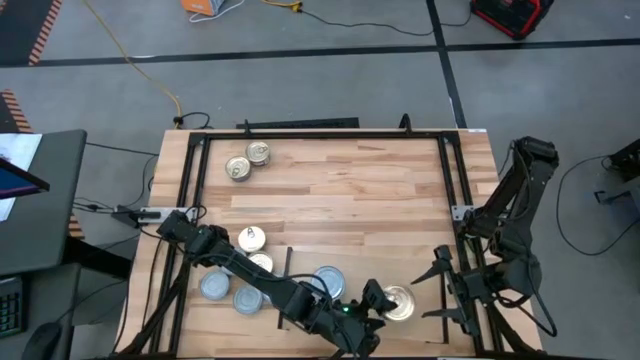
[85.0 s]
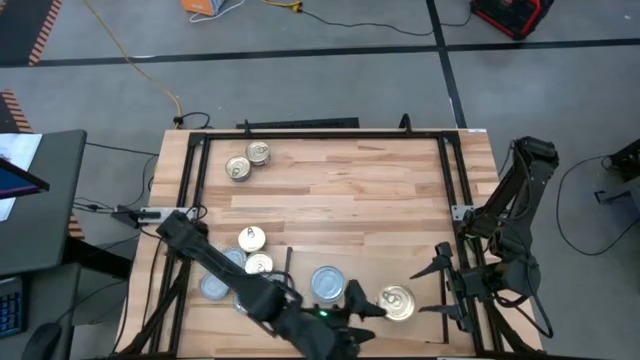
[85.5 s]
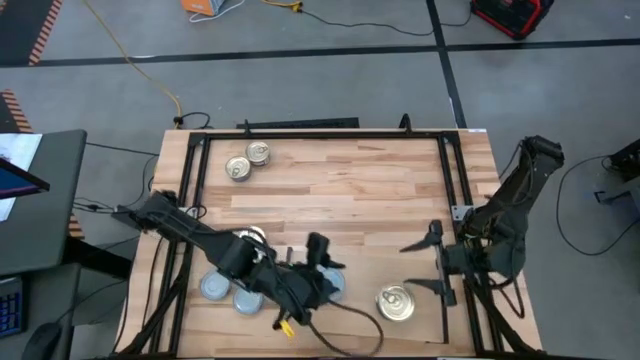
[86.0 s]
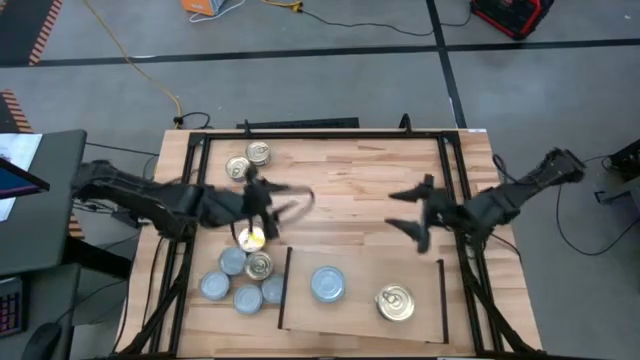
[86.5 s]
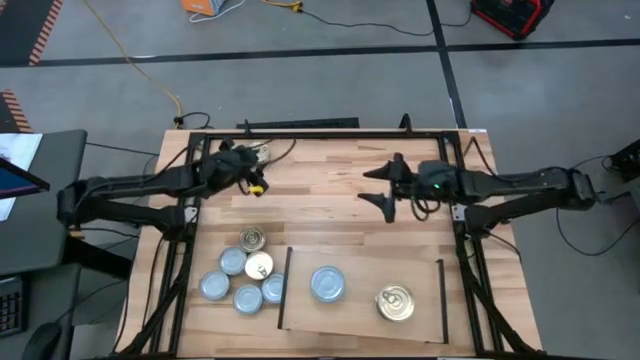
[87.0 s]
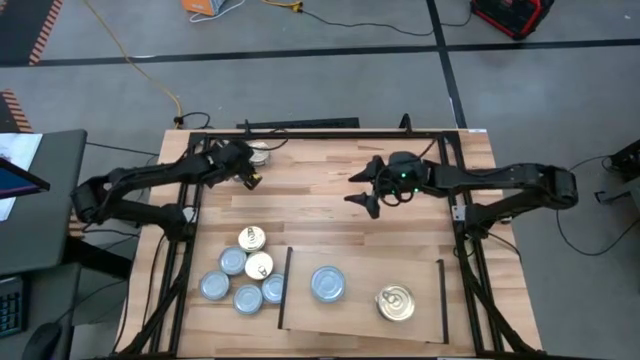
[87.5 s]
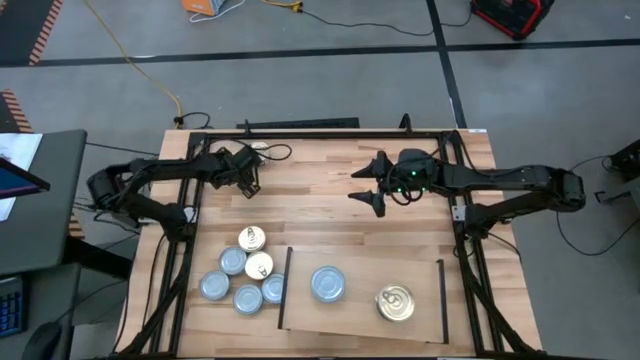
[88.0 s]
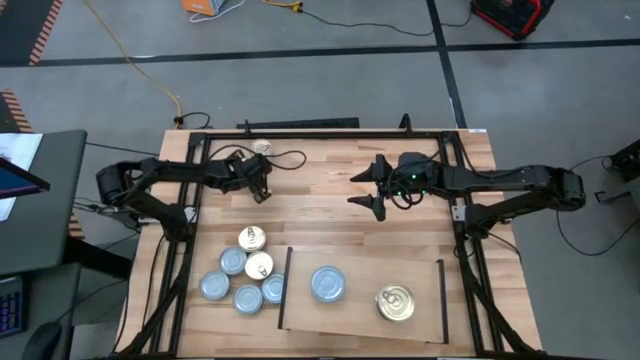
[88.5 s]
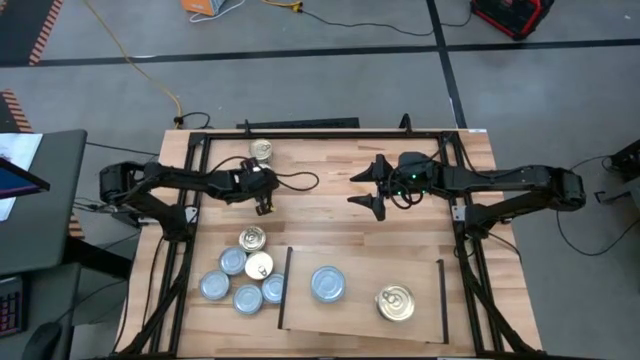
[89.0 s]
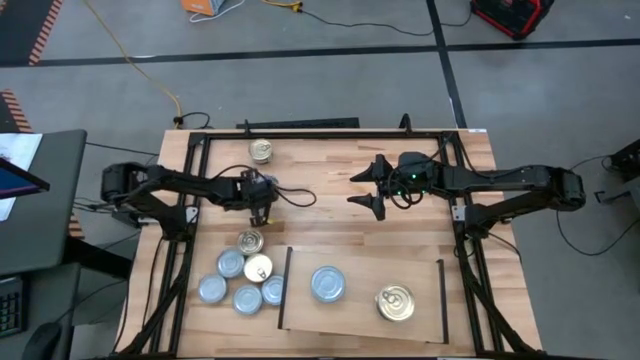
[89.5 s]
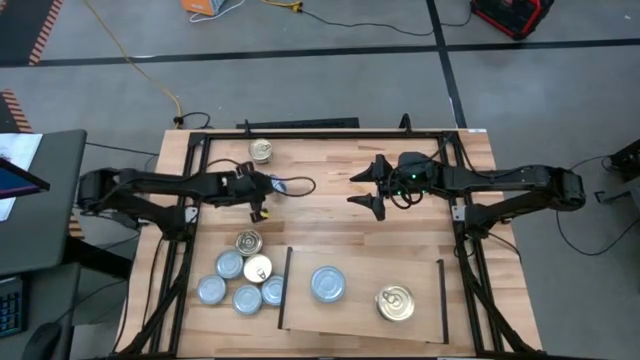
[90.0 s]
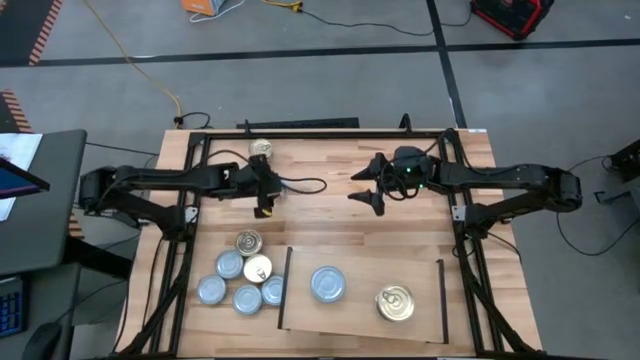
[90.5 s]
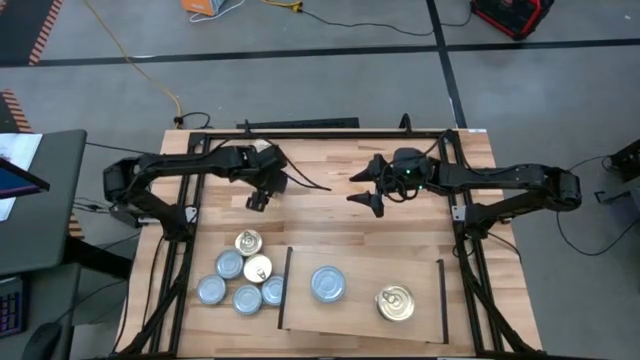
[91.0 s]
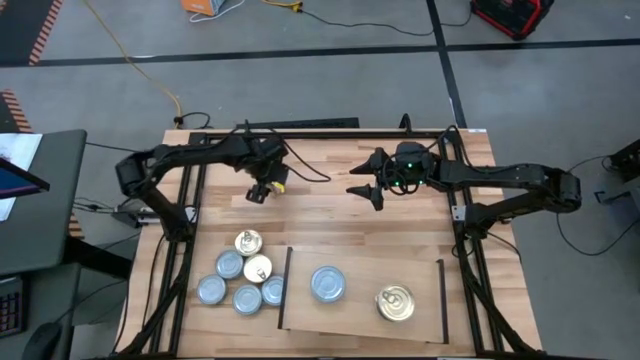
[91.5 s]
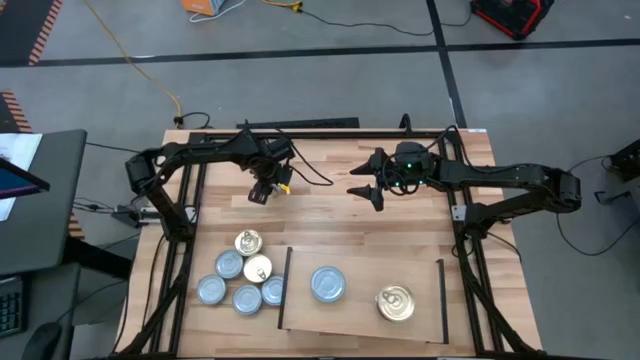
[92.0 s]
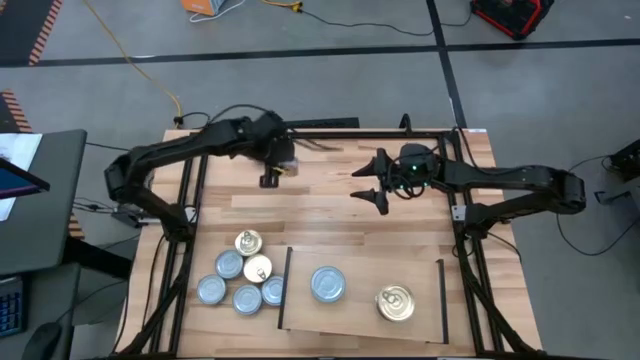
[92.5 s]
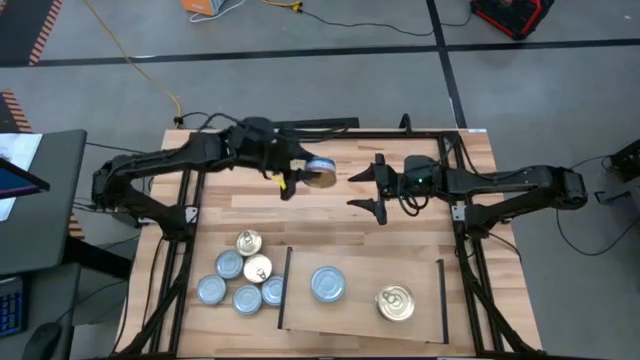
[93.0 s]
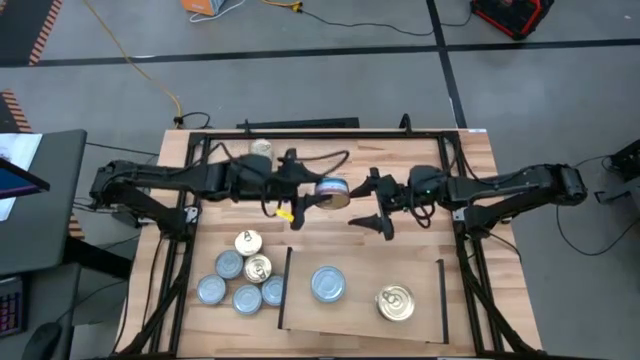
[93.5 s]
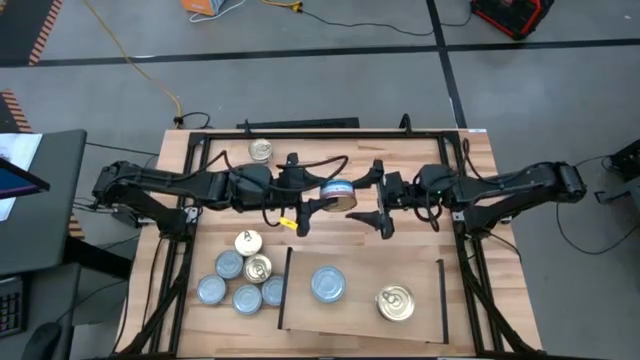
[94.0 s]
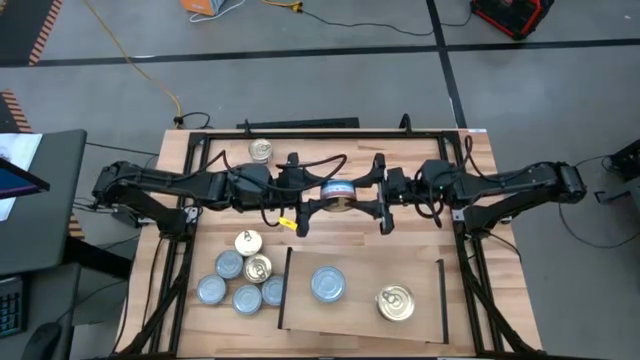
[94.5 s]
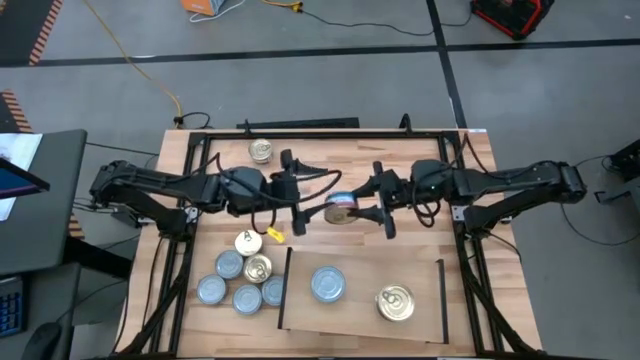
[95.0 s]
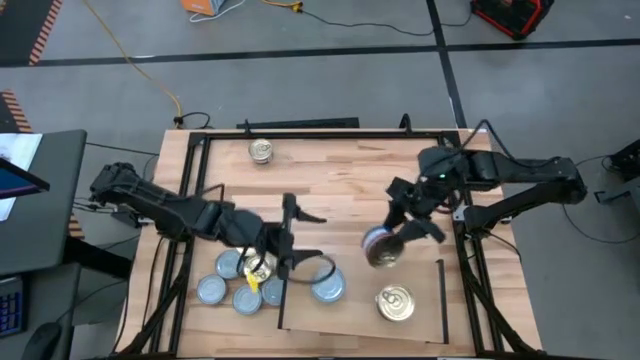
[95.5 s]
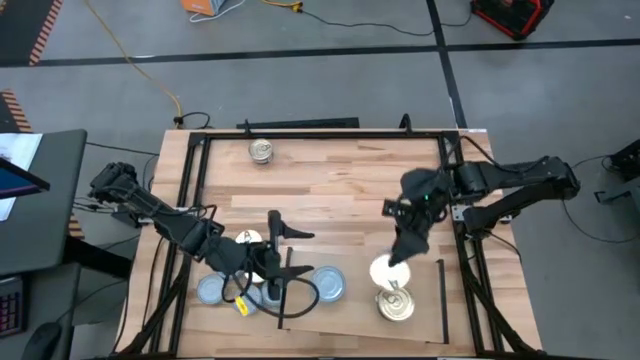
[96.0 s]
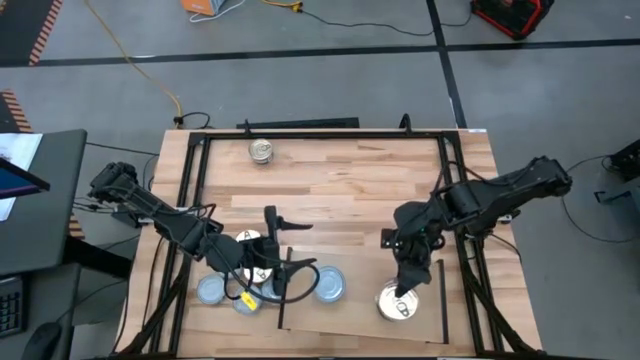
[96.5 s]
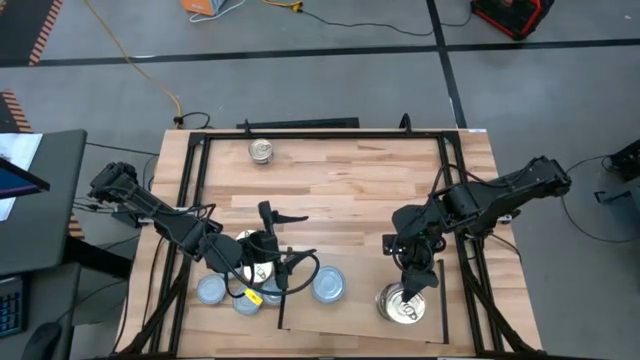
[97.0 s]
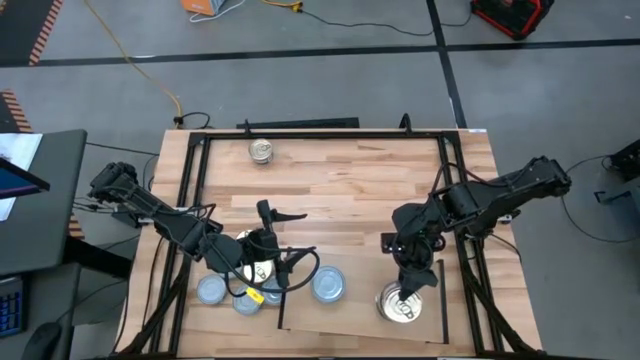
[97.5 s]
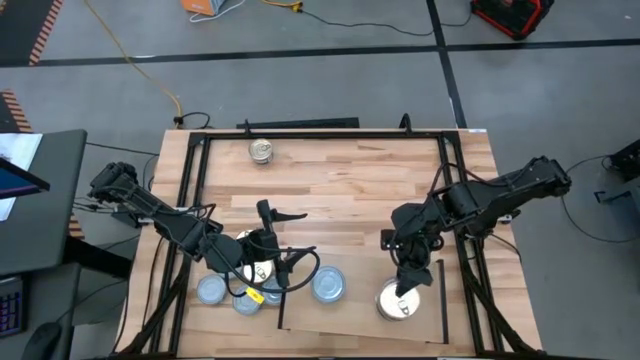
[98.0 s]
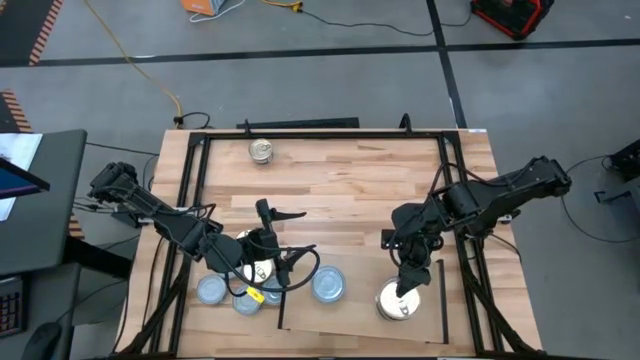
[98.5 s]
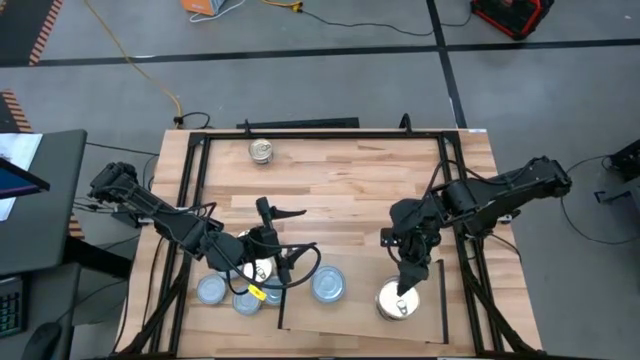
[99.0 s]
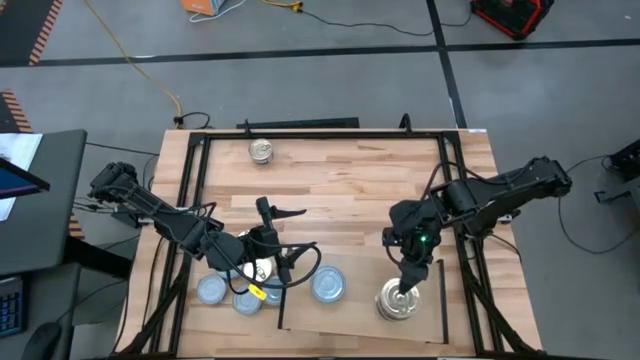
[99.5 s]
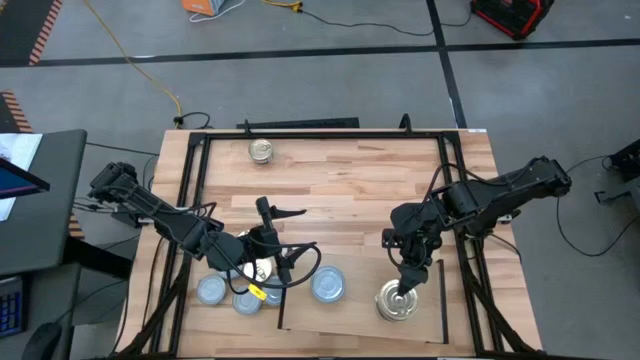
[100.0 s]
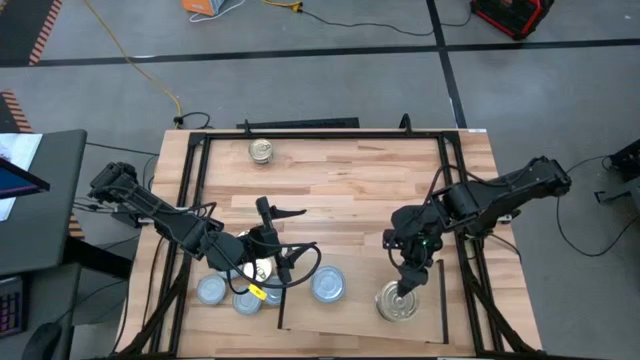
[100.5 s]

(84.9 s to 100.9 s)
Task: Stack canned seafood by type on shelf
Stack the blue-pink tuna can on the top of the blue-pink tuna cans on the shelf

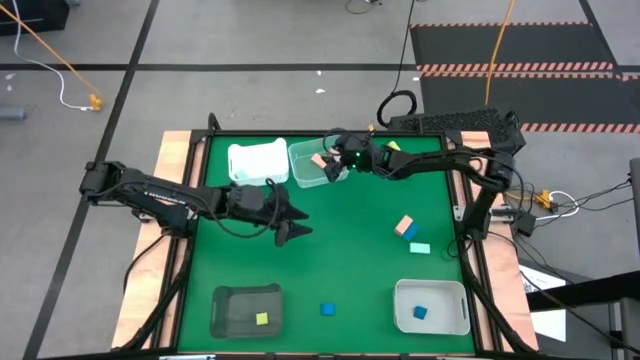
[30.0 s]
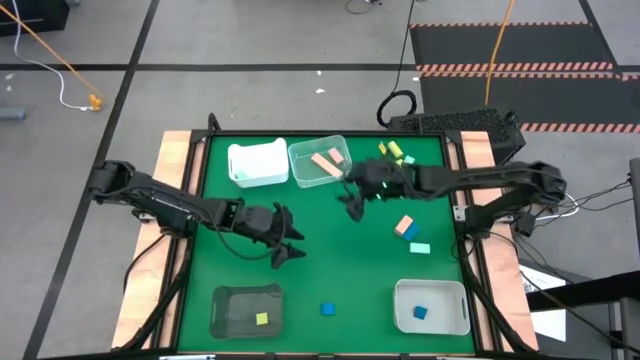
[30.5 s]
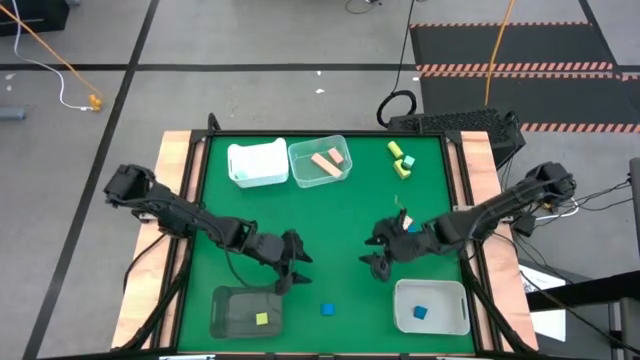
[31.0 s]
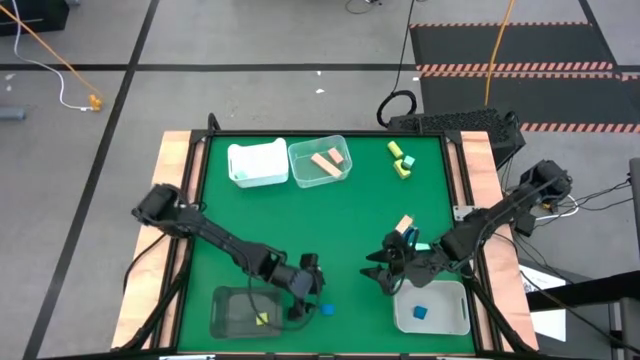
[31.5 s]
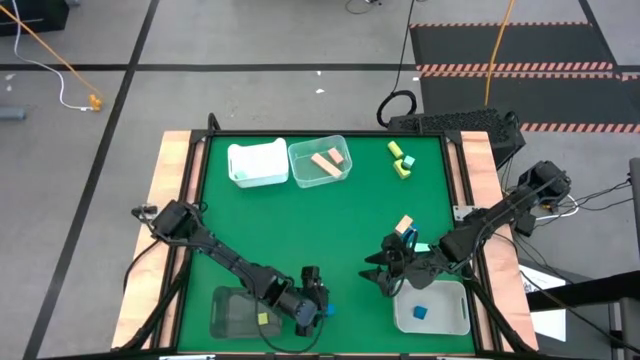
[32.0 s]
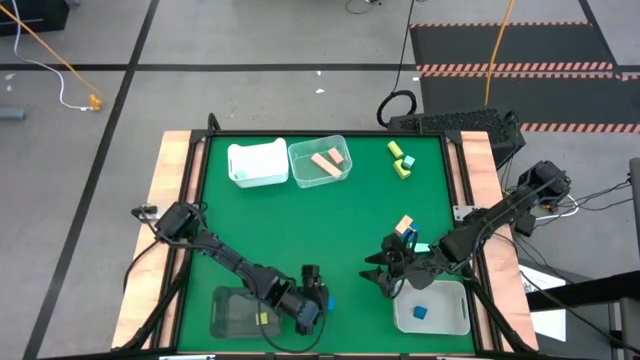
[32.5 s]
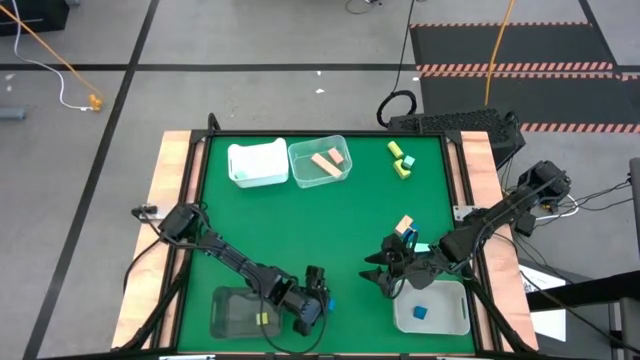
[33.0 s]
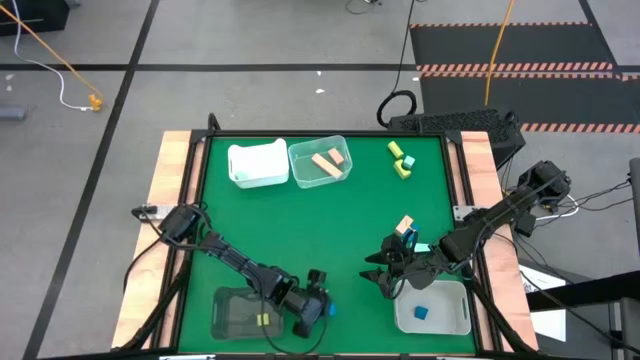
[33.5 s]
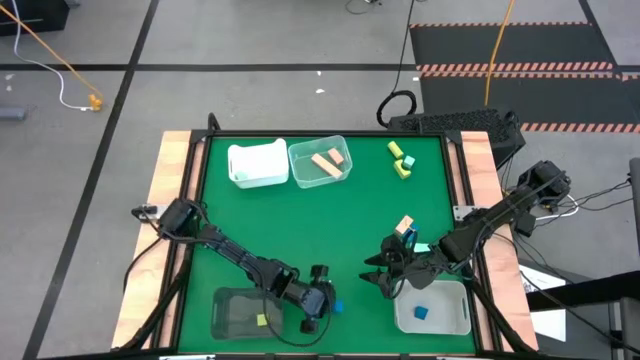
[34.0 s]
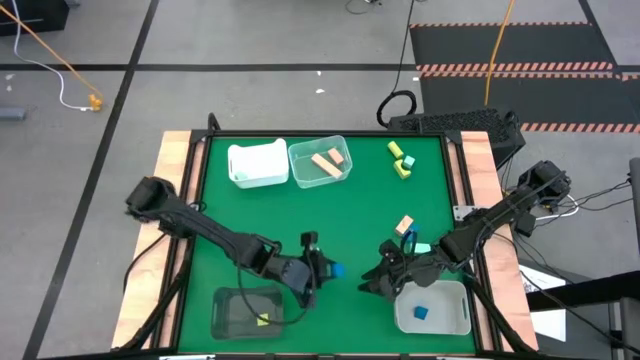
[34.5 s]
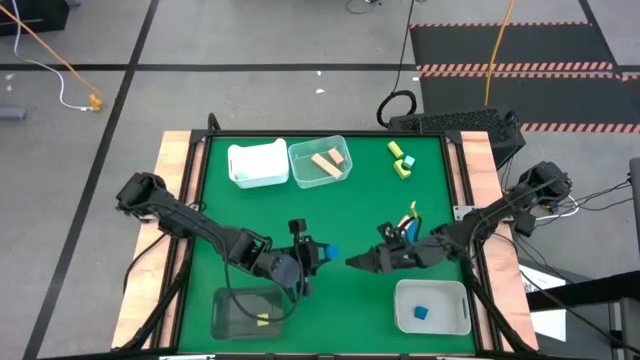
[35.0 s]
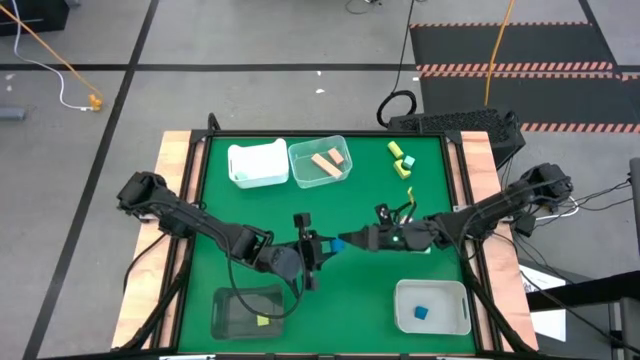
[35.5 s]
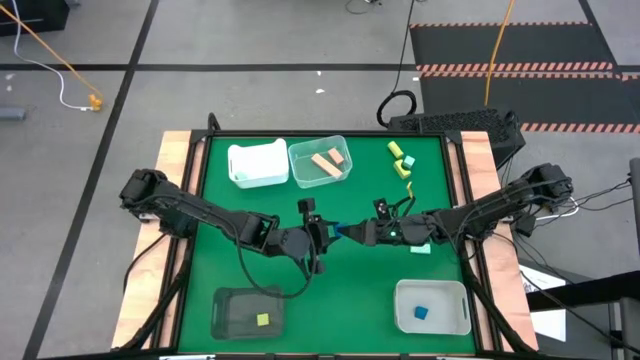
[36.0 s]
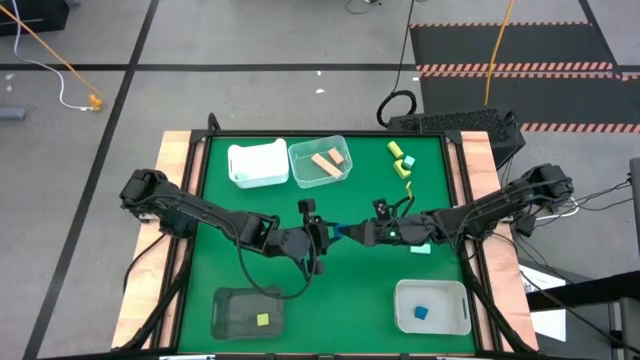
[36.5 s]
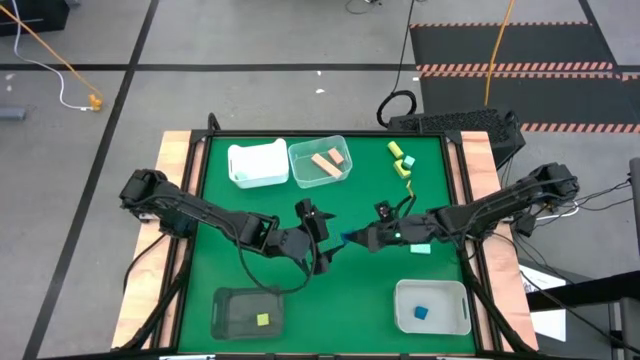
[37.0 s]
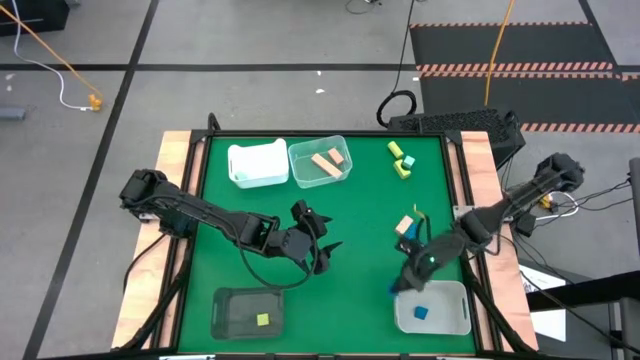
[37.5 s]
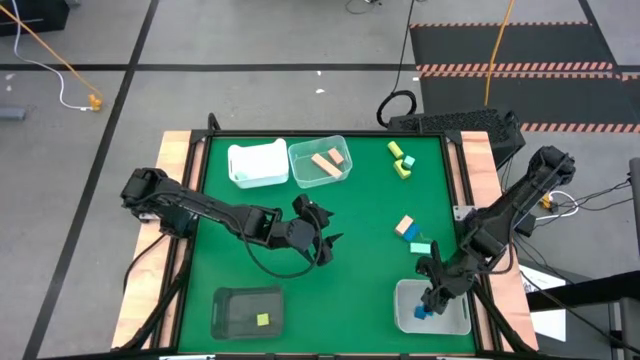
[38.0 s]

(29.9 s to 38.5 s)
Task: Sort & place blocks by color
Put the bottom blue block into the gray bin
